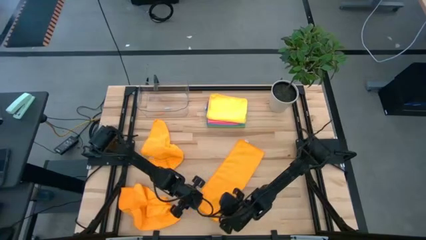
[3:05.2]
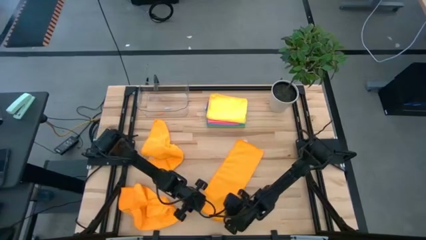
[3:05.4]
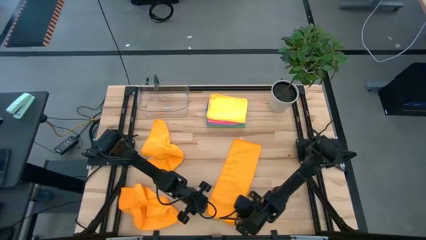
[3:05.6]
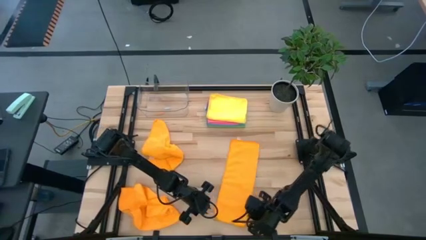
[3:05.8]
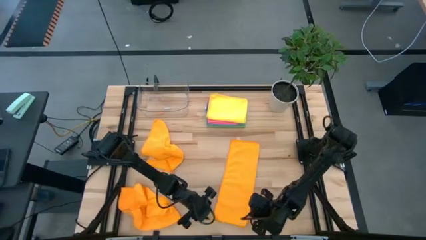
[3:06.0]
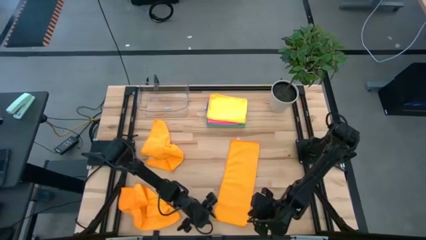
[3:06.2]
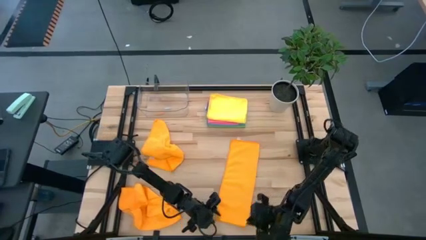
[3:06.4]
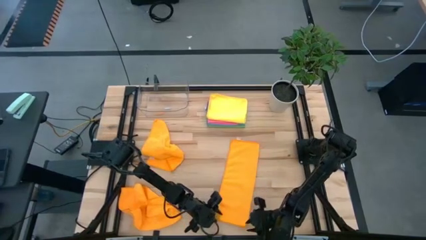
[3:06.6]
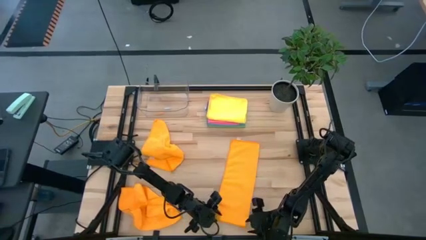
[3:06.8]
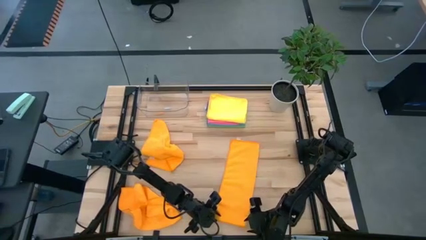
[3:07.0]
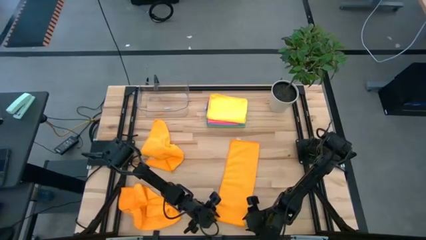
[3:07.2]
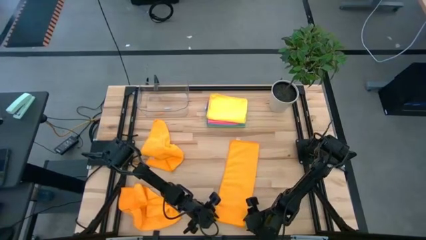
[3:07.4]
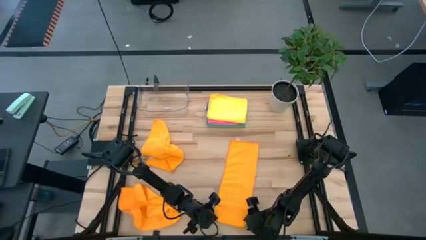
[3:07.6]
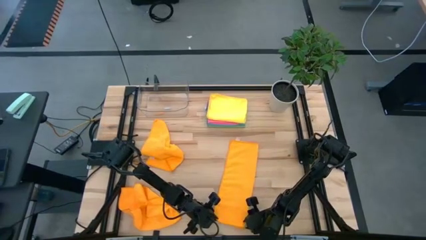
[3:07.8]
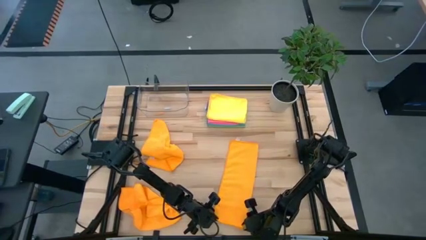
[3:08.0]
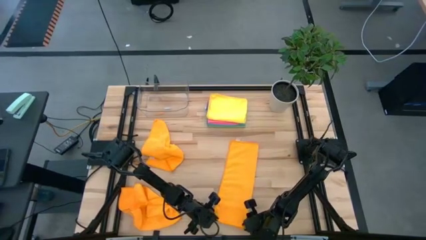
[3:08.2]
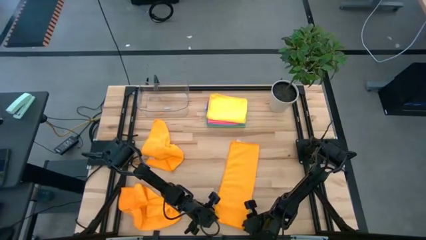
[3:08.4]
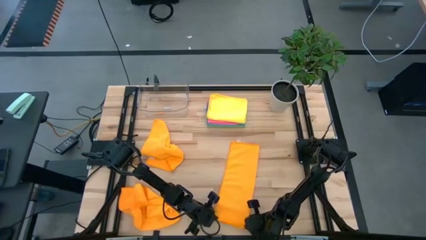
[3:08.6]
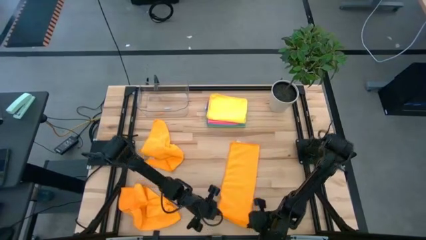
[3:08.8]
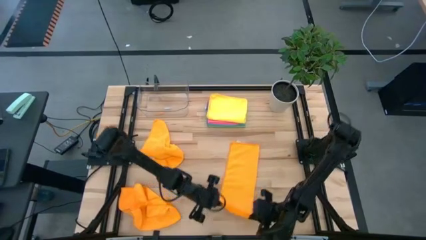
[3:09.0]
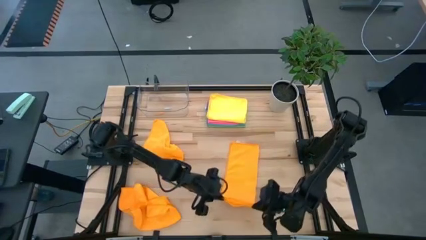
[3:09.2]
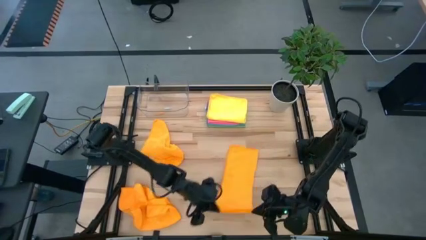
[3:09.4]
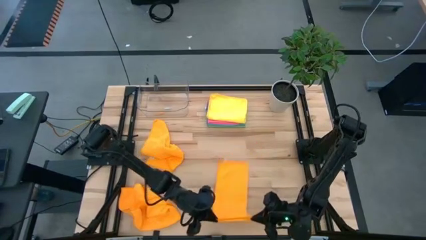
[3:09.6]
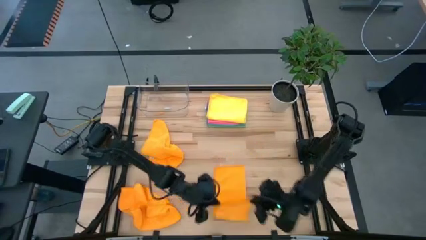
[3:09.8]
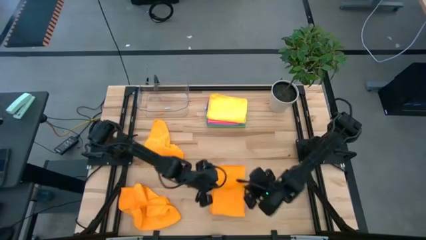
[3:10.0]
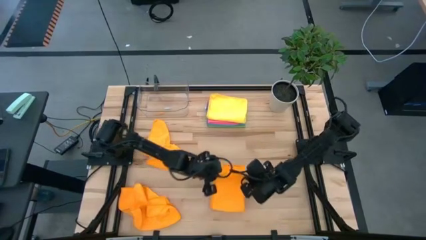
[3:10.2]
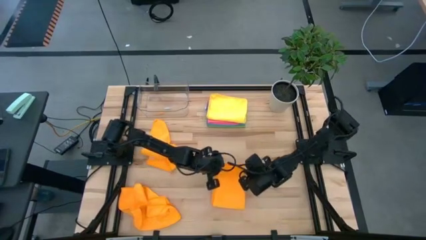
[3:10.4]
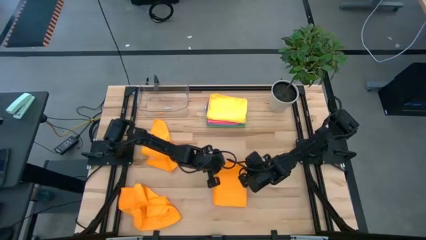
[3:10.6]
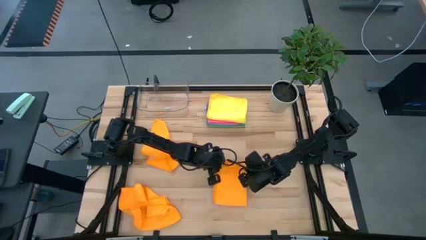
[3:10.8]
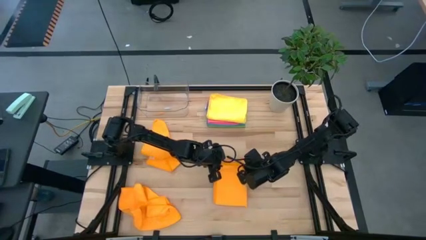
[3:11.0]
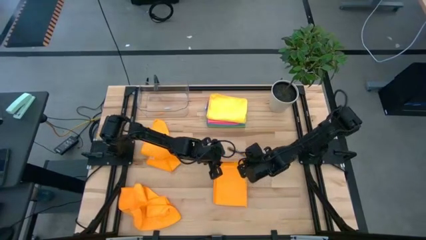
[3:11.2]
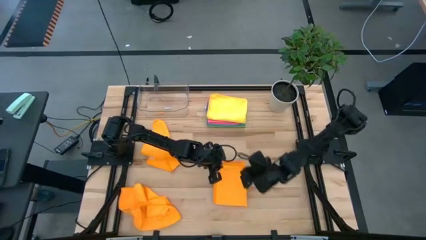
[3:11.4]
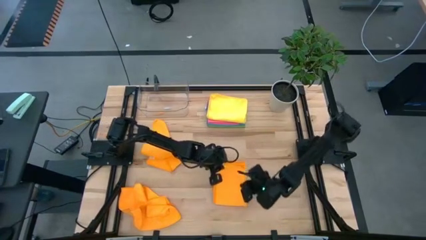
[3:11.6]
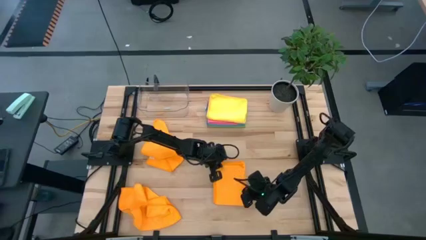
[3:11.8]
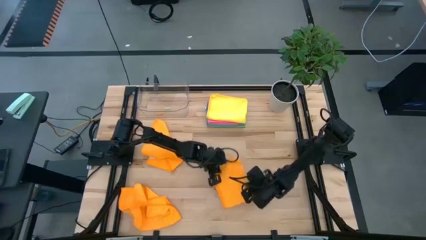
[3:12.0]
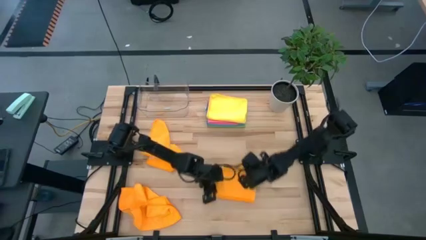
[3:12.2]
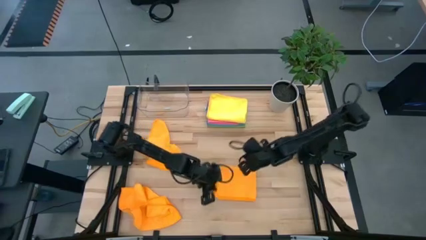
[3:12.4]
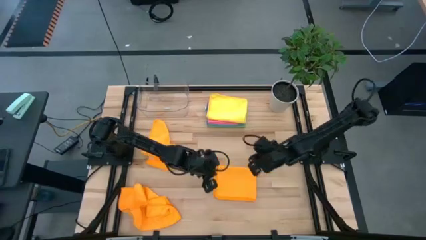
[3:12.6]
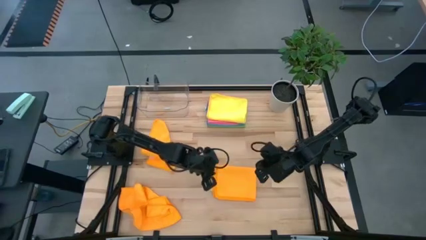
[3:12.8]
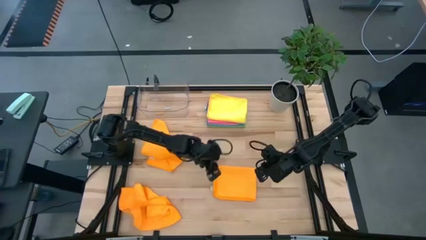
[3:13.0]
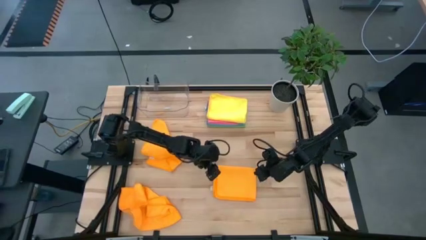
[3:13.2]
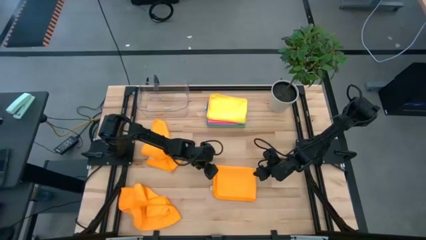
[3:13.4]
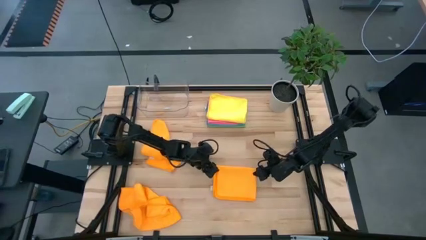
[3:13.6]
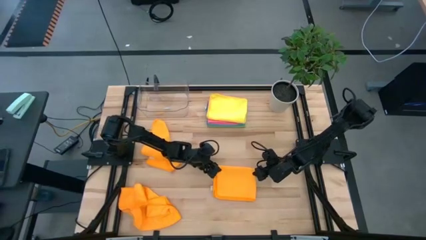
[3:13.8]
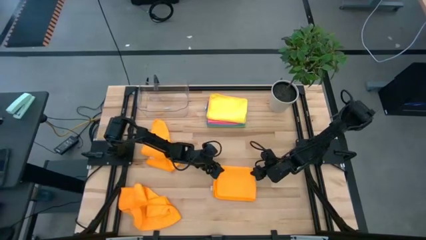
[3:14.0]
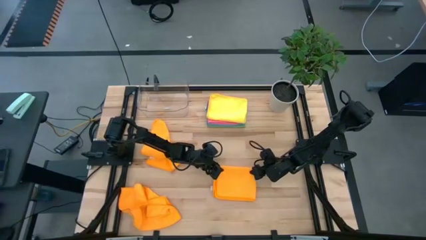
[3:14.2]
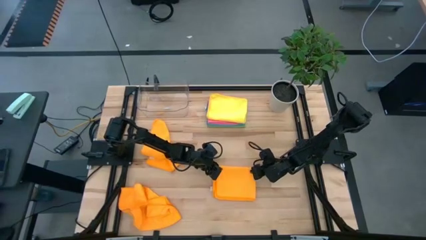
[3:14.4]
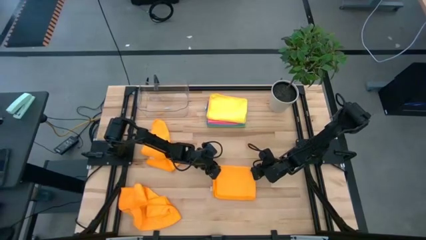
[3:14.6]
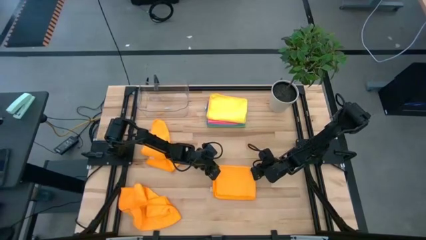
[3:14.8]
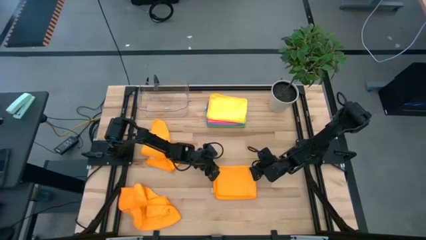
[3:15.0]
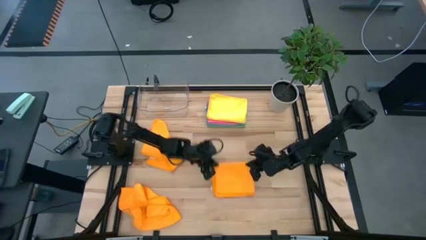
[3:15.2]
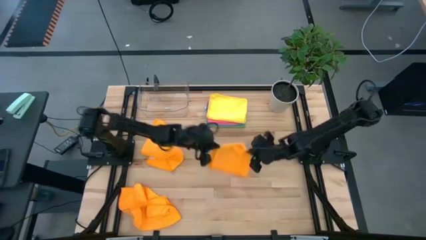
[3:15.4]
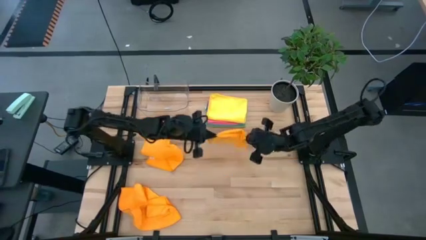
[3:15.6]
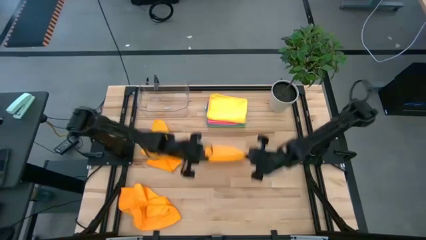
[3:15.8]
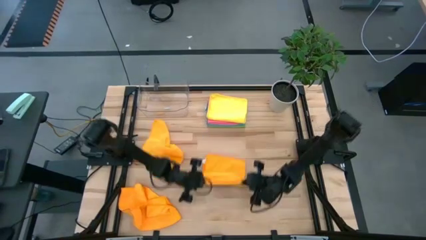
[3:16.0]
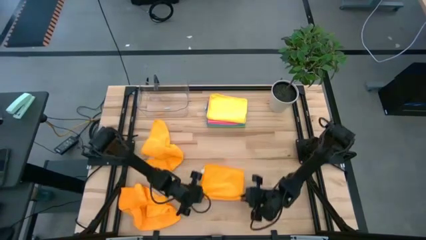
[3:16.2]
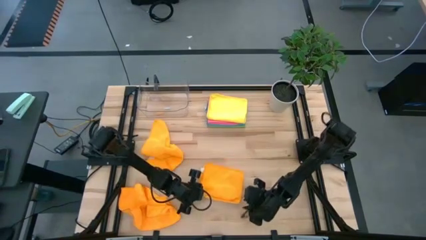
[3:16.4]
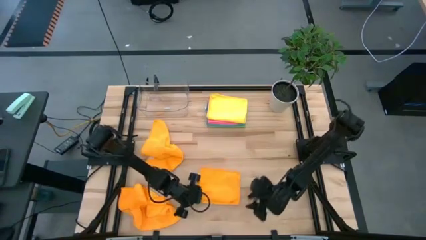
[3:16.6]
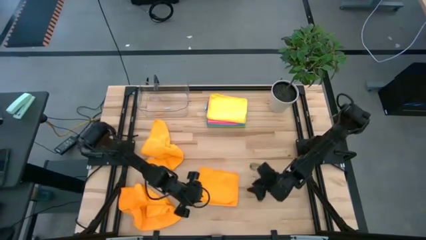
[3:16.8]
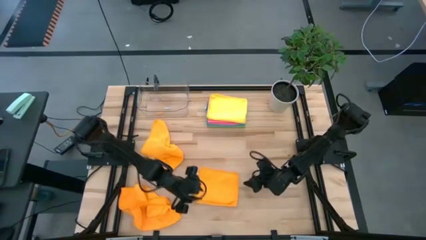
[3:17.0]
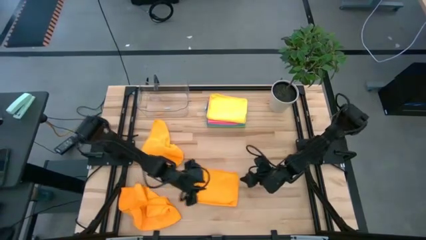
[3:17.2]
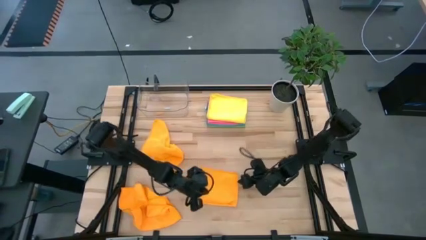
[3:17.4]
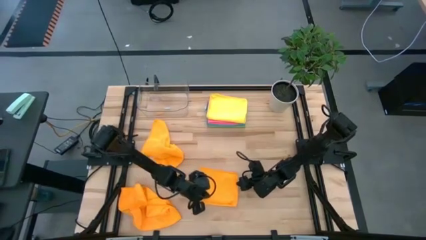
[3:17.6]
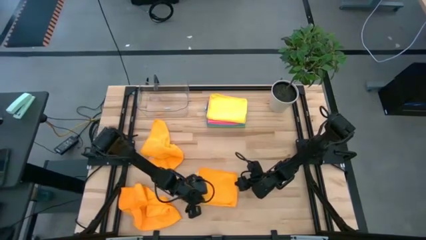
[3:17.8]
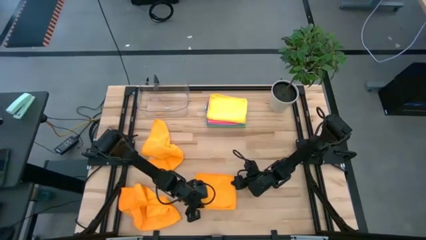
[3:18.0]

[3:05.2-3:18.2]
Task: Fold microfiber towels
Fold the middle orange towel

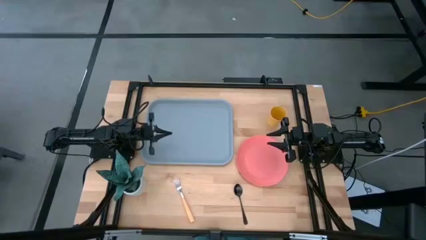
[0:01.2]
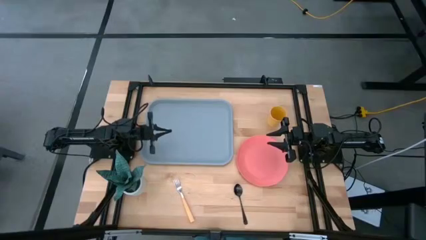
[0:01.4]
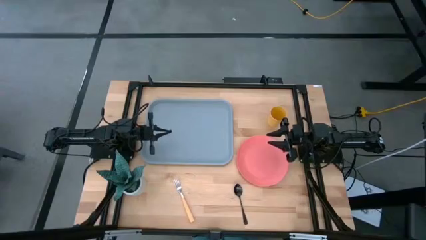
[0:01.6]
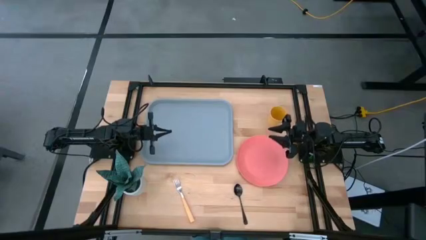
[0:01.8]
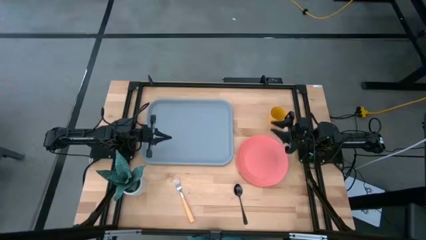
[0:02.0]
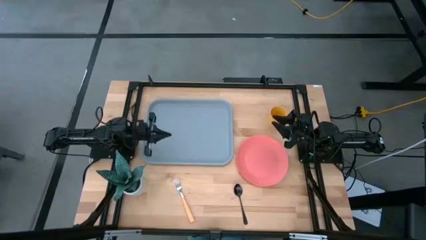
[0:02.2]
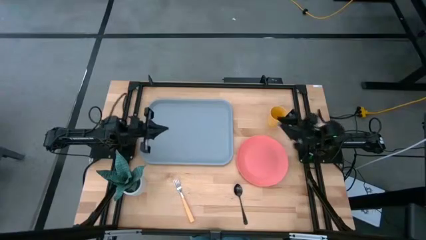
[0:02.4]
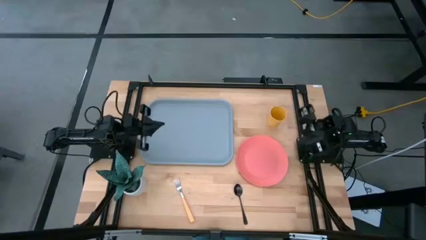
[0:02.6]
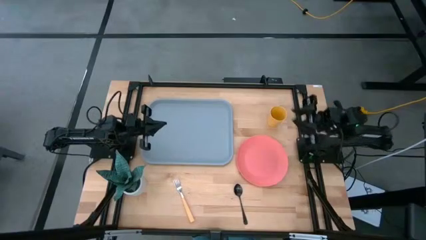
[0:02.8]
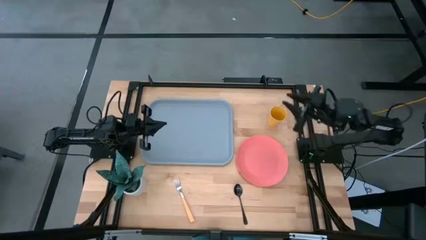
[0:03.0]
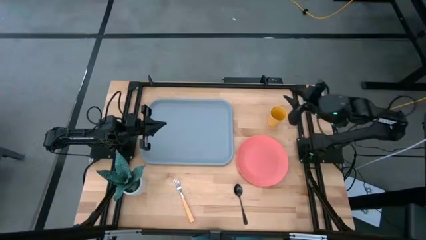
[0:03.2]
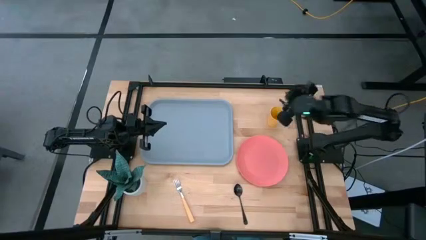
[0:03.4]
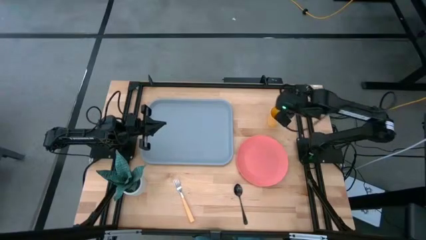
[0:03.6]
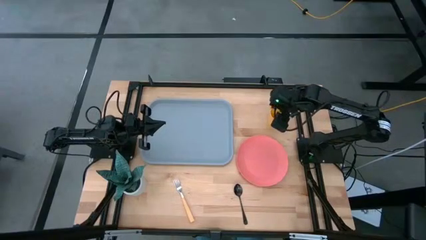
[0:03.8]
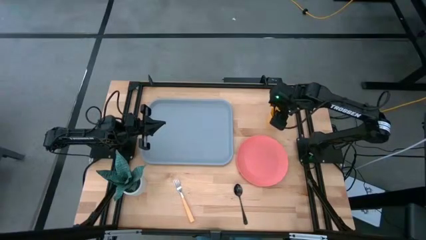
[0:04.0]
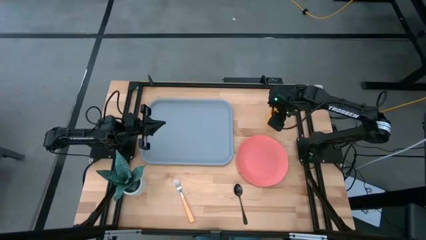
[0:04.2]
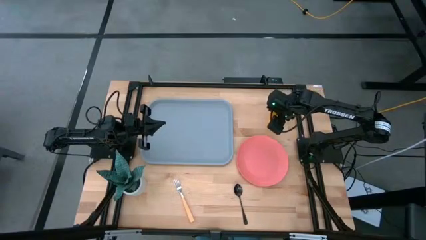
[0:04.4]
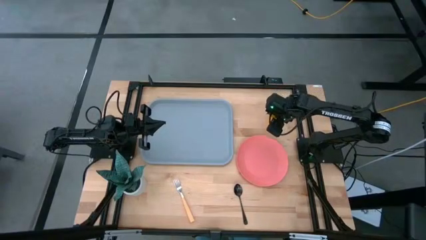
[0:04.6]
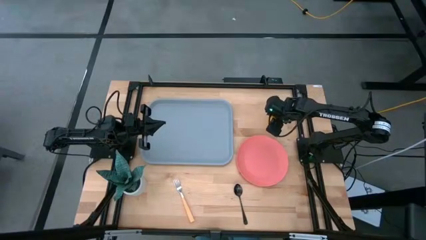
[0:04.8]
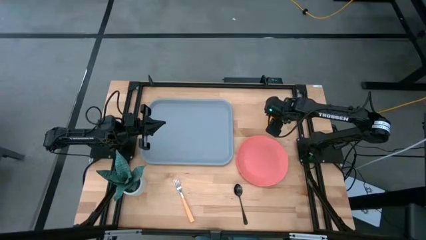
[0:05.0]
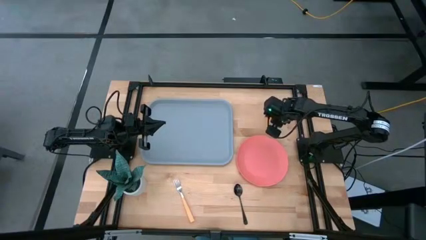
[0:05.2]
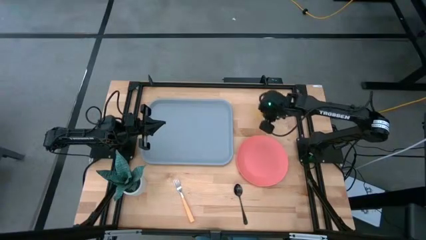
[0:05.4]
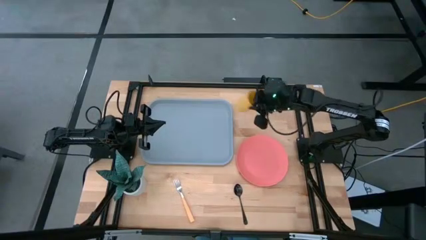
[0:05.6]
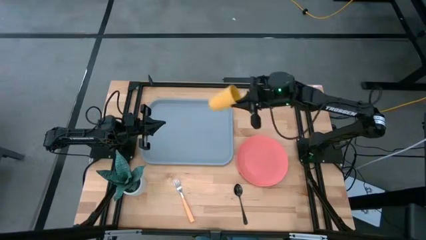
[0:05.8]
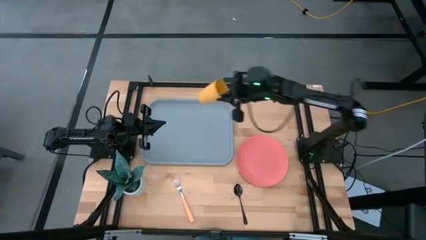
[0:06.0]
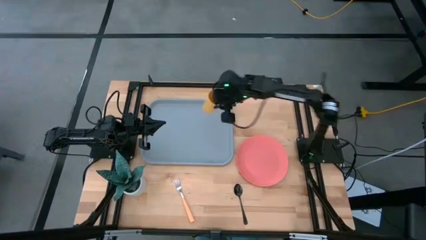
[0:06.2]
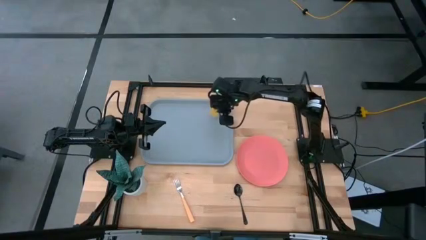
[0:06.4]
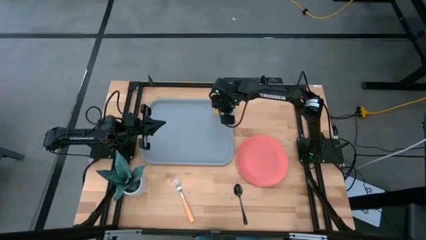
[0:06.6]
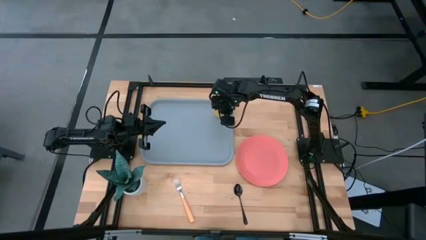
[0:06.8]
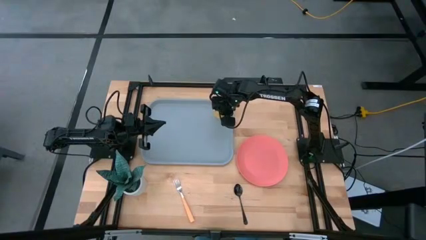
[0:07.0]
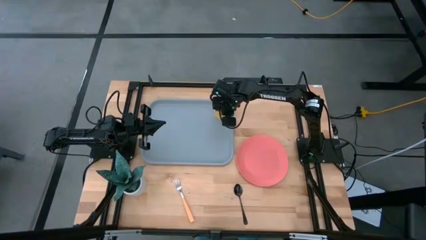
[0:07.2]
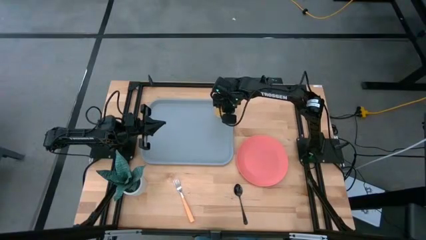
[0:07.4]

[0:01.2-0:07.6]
Task: Pick and place plate/cup/fork/spoon on tray
Put the yellow cup on the gray tray
